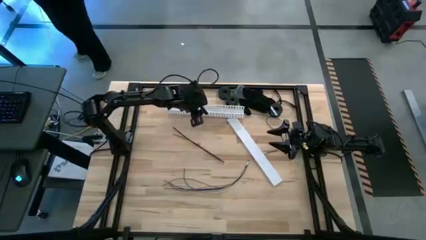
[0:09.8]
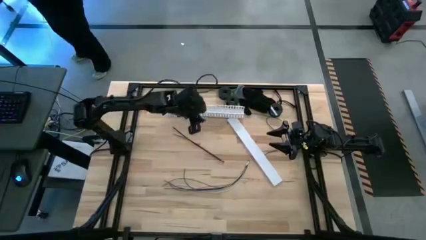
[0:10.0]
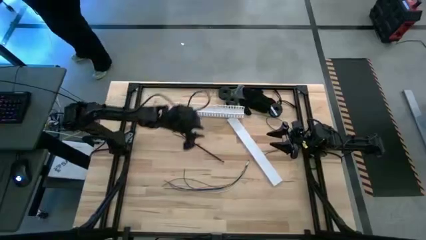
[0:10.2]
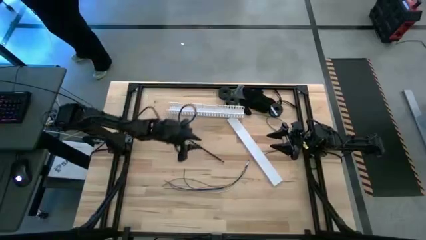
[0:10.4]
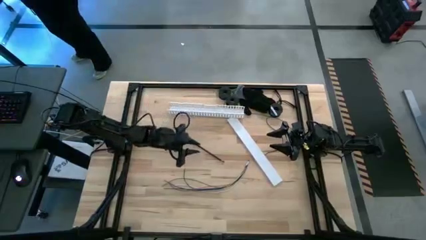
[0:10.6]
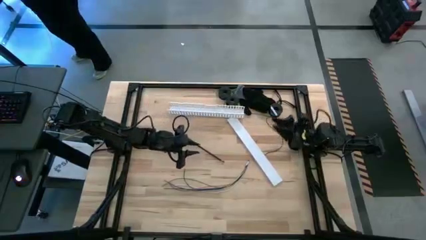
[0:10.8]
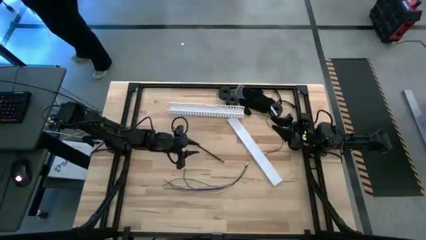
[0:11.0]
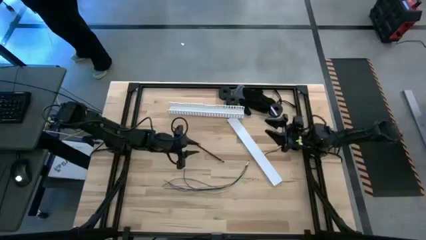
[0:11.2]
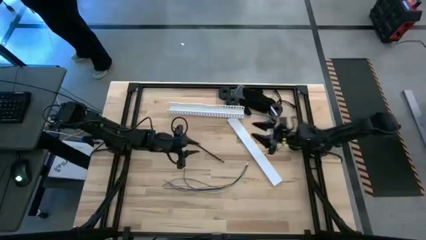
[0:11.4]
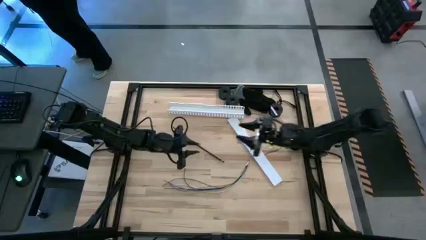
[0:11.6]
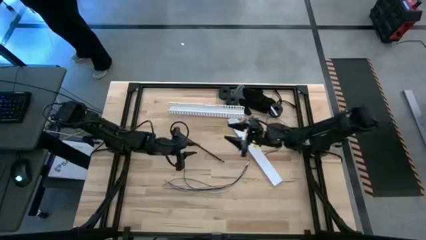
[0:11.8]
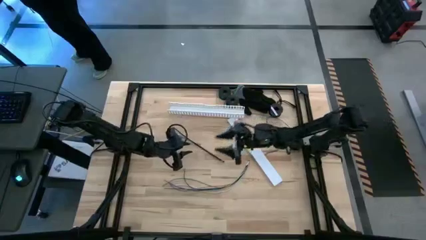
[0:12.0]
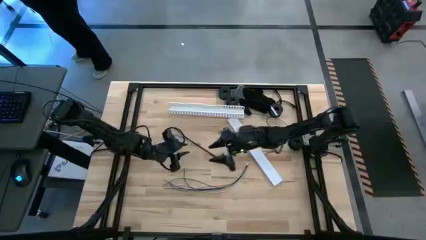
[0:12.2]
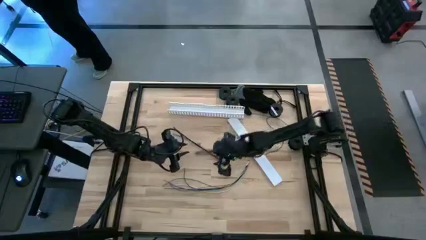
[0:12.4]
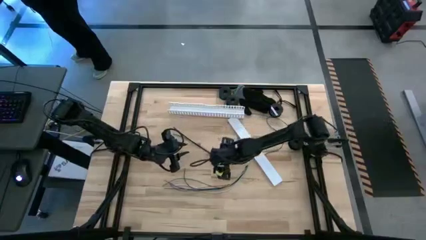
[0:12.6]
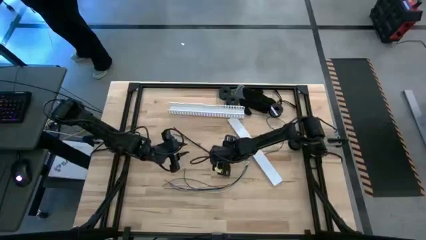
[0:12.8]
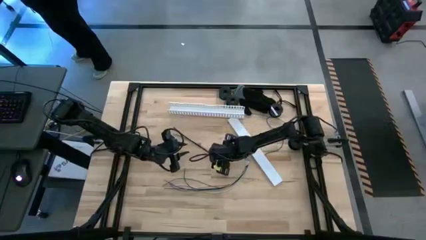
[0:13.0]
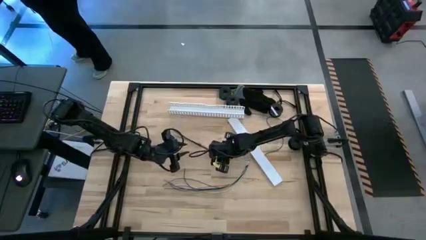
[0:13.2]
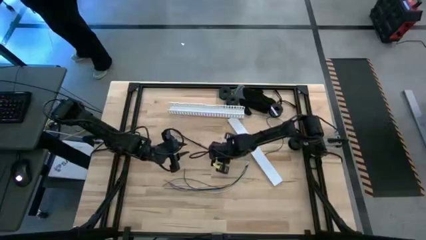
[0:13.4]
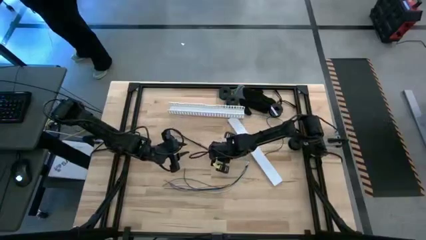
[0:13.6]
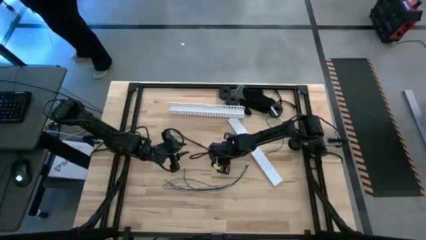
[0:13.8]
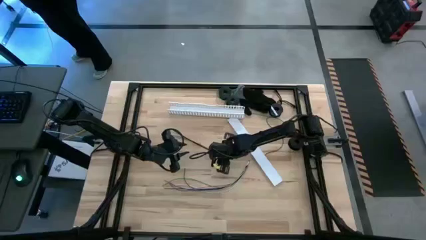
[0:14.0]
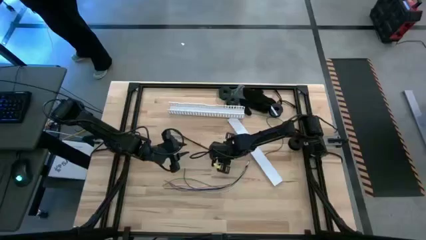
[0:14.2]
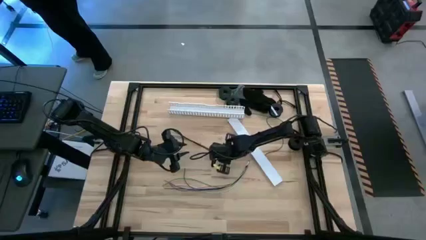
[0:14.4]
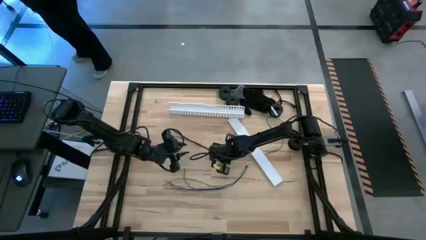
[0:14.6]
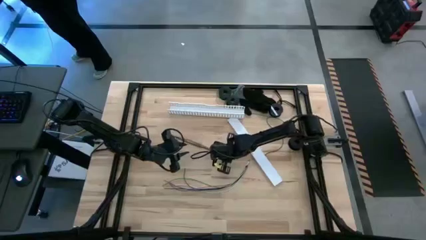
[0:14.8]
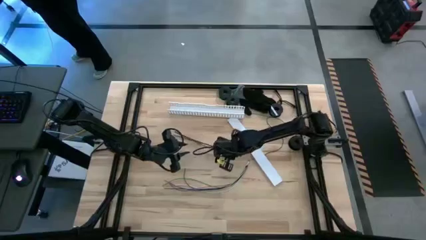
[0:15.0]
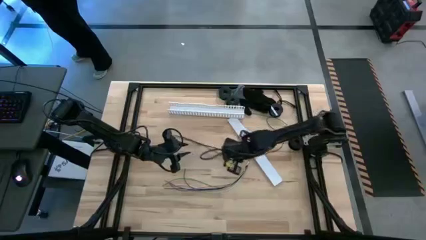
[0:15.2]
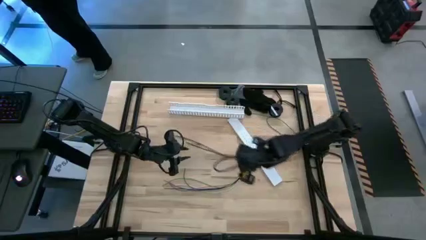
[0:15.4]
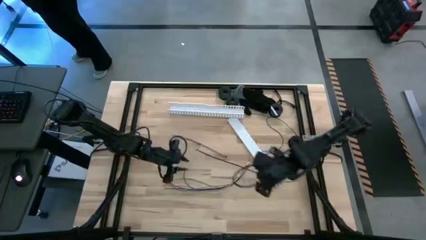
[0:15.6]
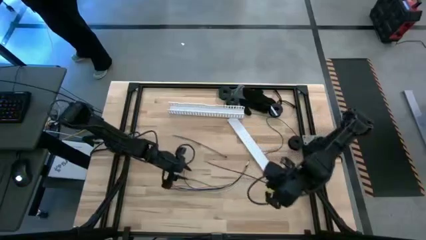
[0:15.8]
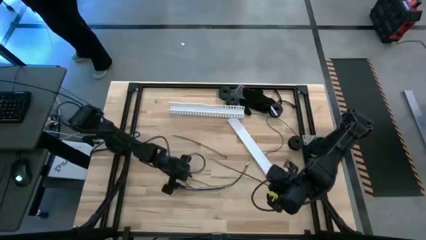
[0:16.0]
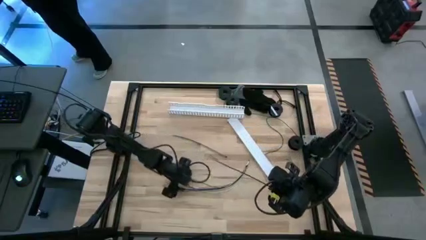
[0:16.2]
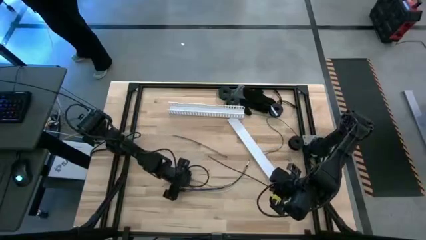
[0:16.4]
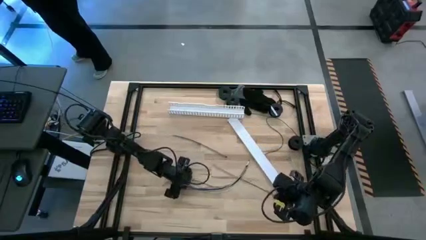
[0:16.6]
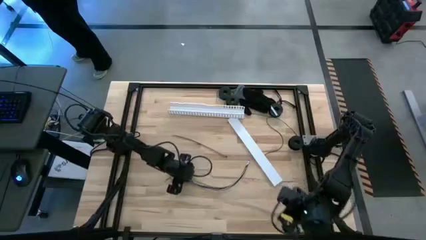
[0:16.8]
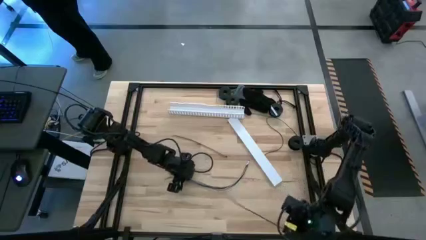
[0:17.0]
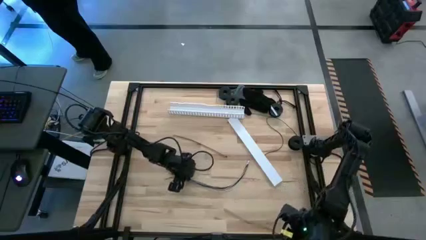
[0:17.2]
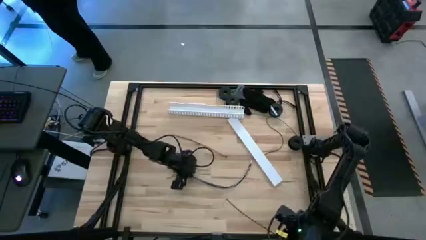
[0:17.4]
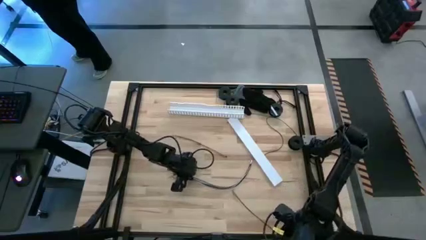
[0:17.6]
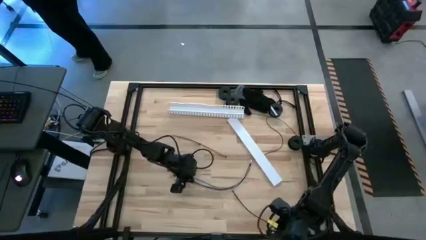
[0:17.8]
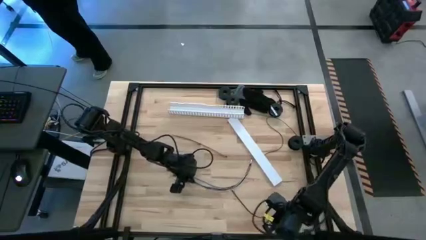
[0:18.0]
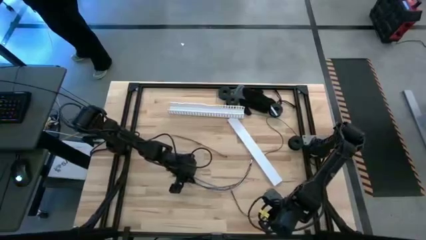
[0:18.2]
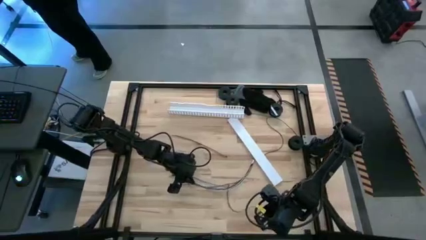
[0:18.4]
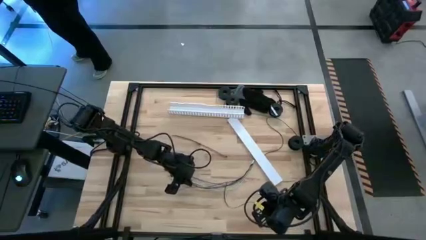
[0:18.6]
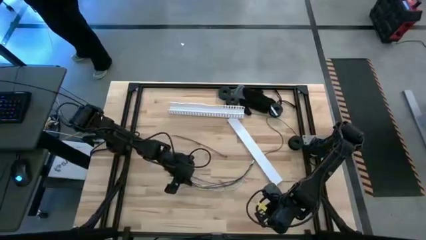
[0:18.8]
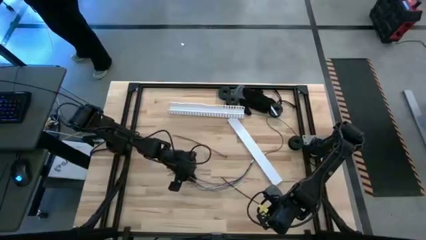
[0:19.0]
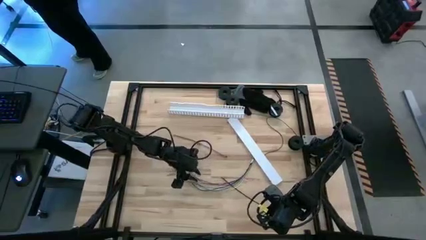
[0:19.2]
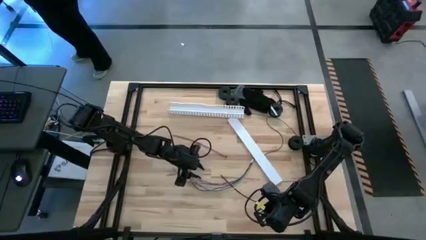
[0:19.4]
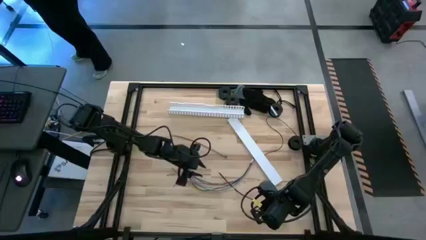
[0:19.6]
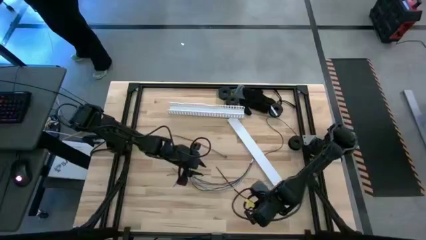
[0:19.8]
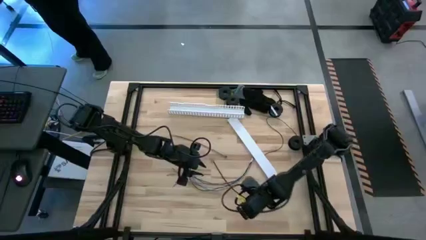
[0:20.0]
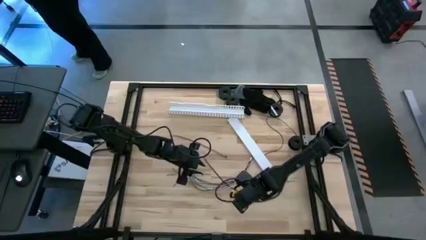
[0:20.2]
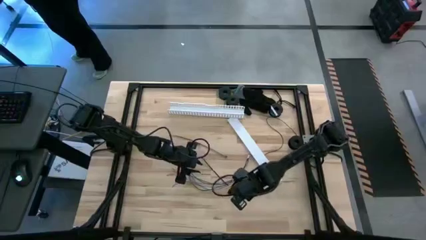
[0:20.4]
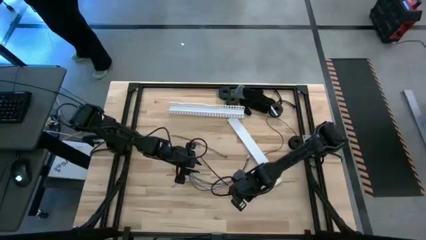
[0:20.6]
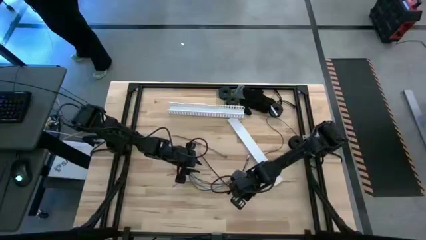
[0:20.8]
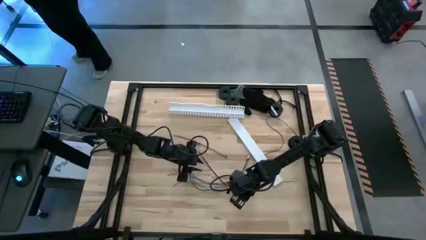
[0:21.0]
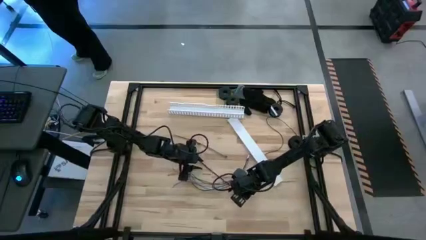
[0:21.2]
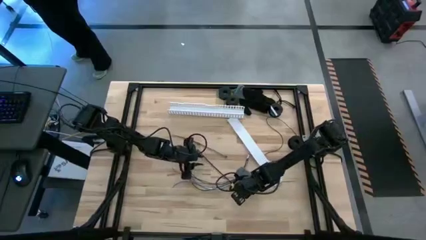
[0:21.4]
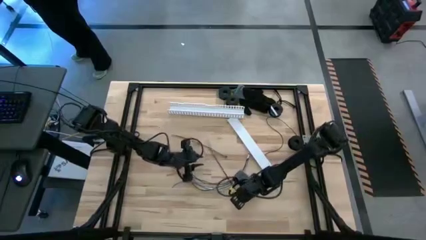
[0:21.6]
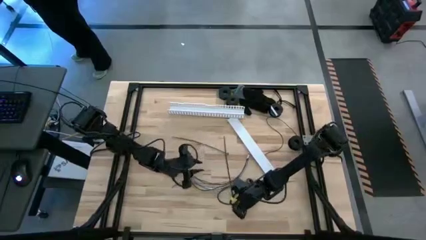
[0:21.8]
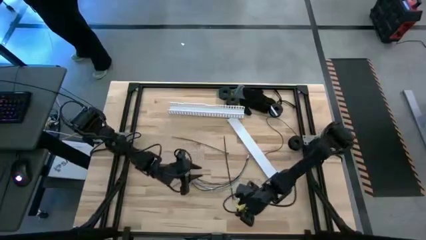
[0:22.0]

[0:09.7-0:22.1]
Task: Ziptie cables
Wrap the wire cables with the black zip tie

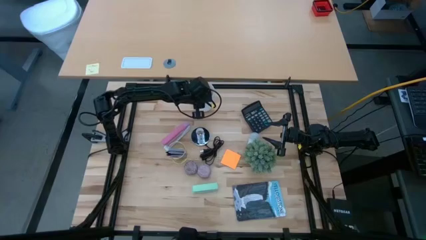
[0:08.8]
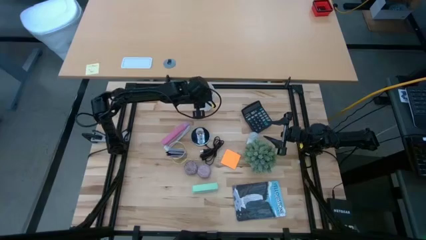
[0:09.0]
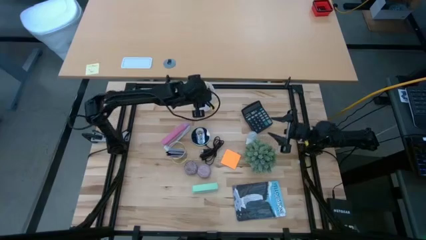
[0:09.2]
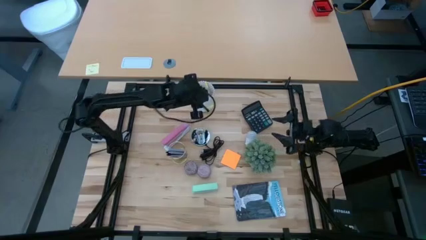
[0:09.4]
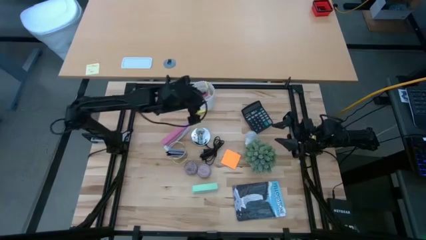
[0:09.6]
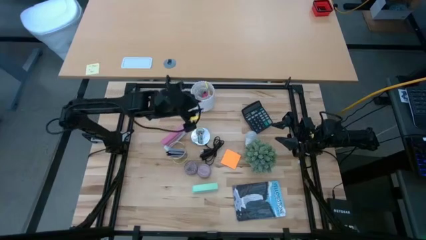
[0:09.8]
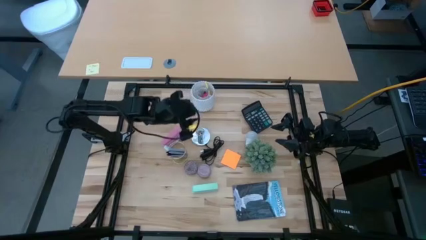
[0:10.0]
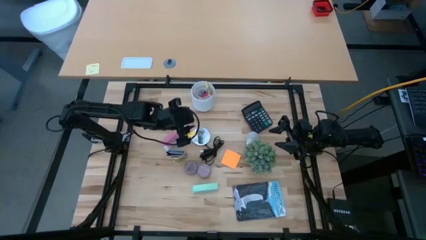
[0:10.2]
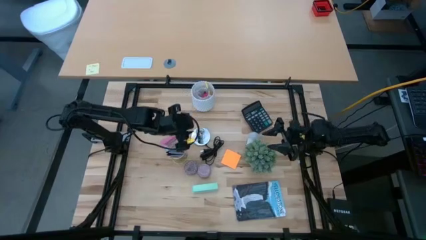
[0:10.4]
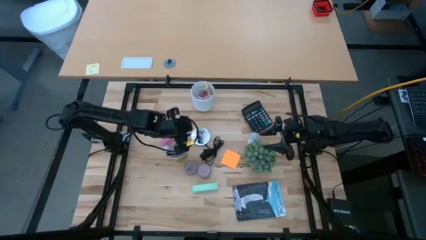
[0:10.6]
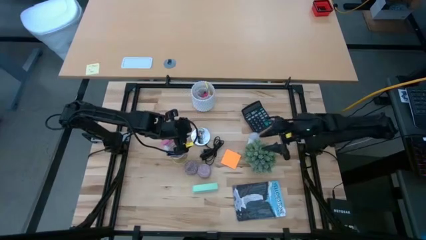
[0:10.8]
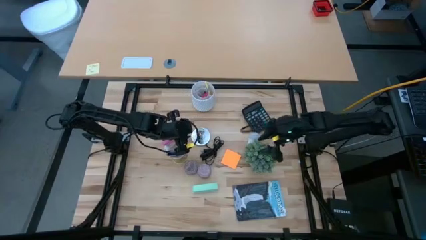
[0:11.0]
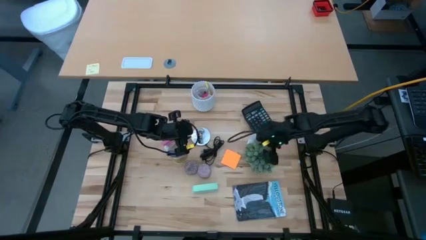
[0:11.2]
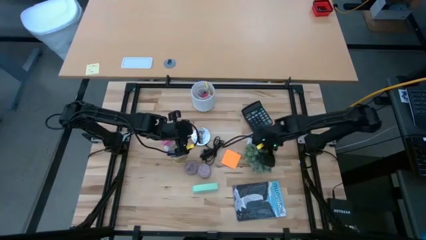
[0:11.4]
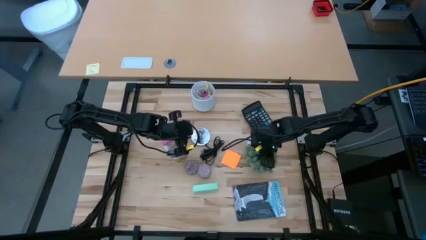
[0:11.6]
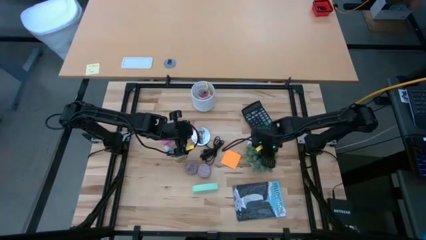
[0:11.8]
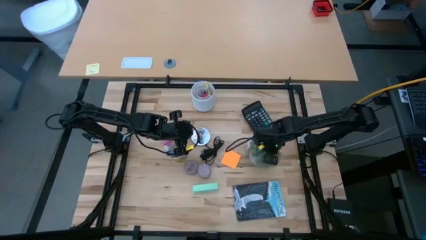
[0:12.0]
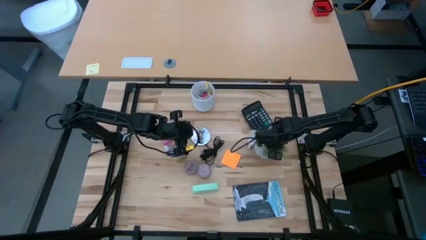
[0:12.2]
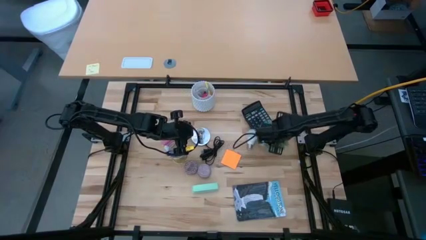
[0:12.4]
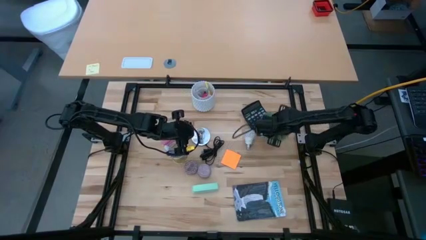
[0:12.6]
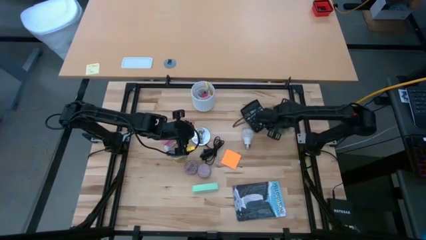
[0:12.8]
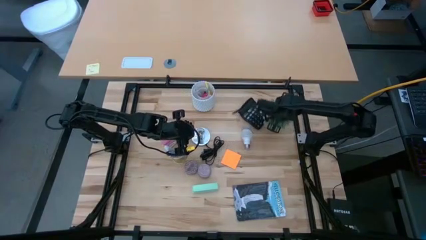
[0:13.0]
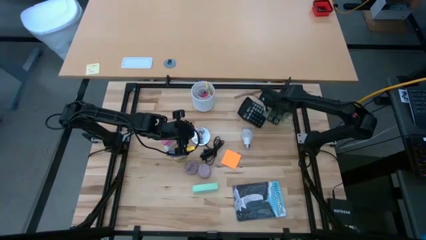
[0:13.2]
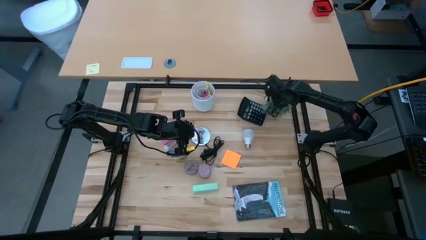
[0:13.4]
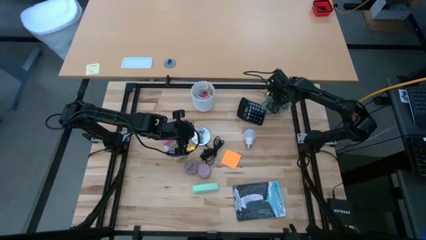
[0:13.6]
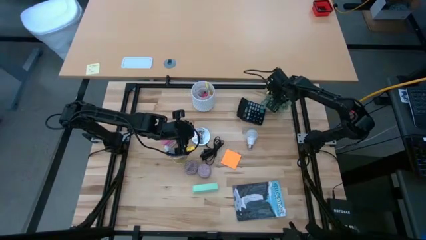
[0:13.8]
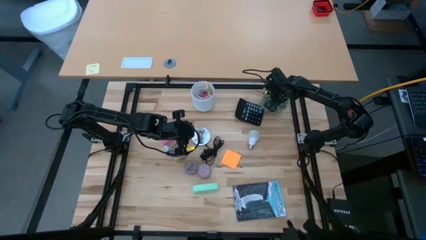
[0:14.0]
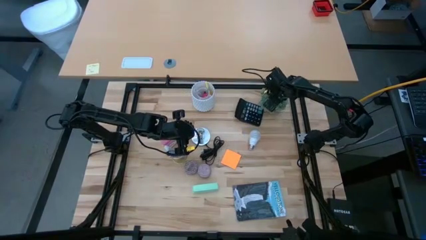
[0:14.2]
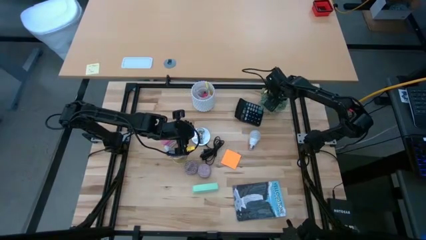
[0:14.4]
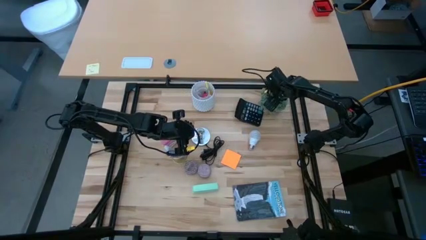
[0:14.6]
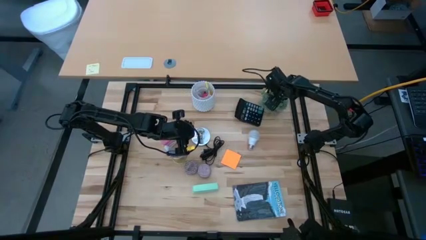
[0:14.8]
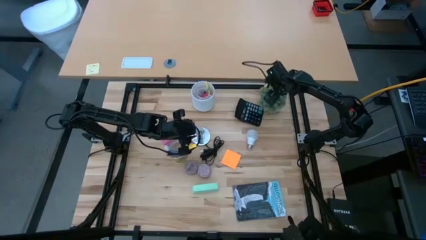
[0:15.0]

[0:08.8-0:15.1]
Task: Screw lightbulb
Move the gray potted plant to the upper right of the table
